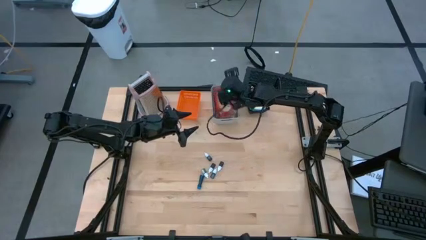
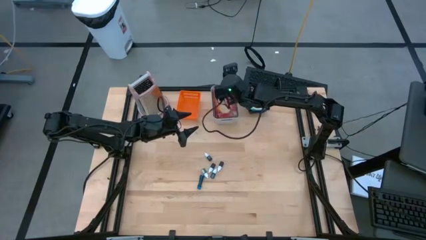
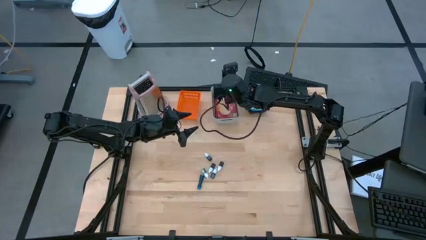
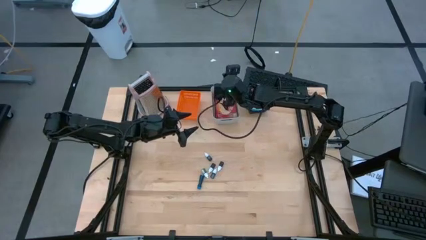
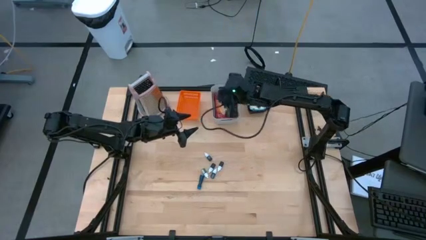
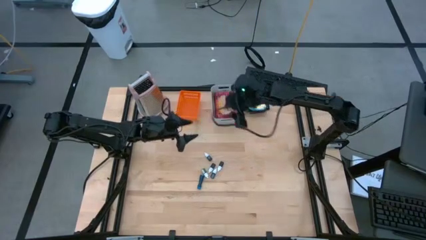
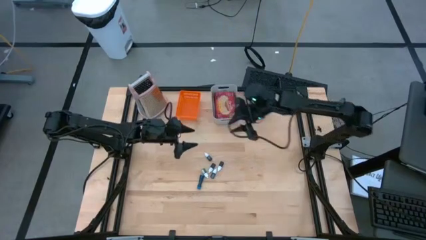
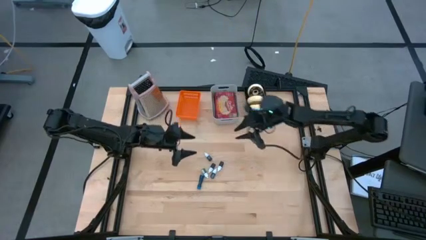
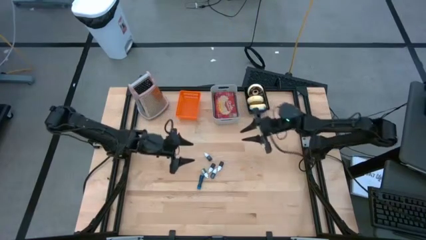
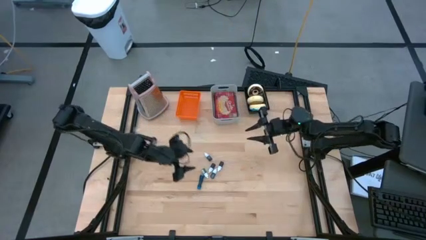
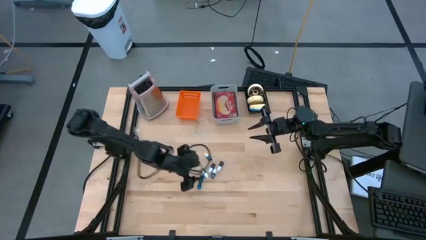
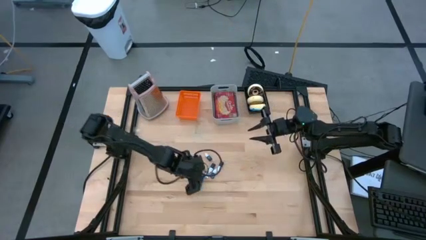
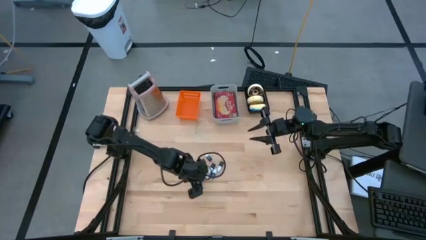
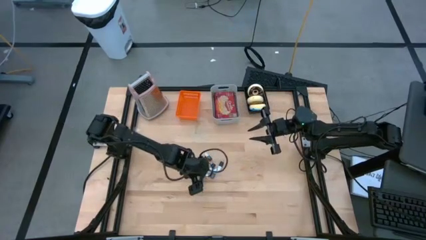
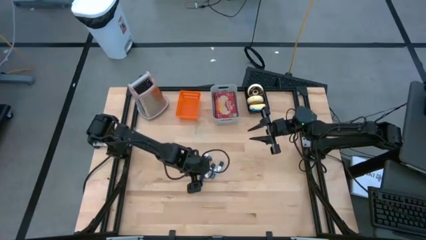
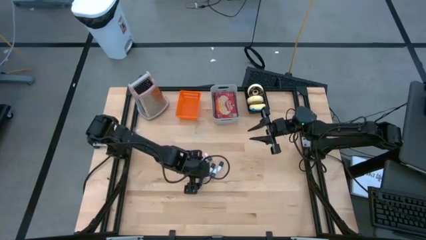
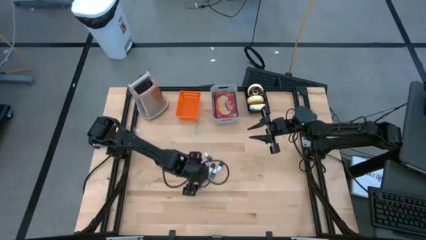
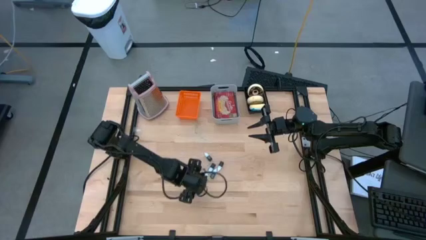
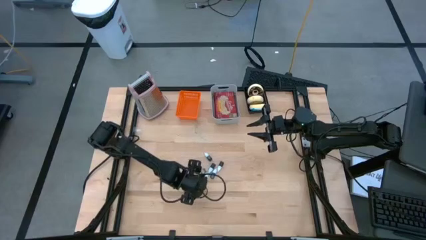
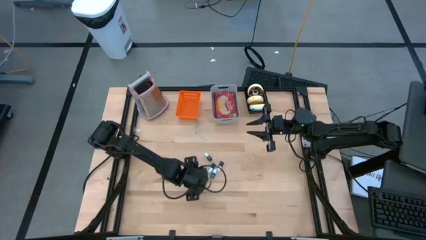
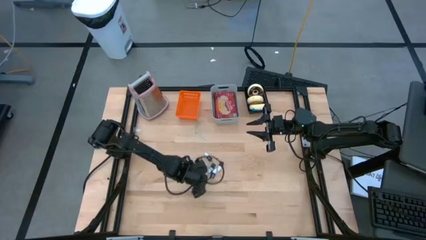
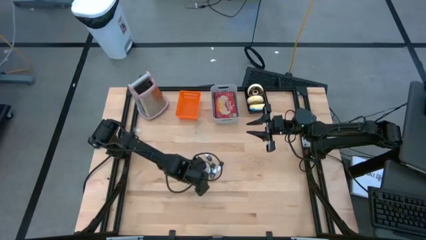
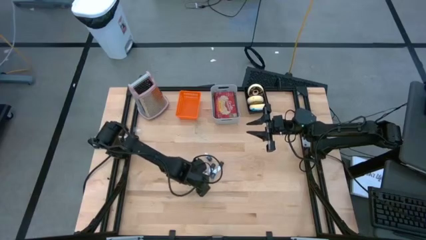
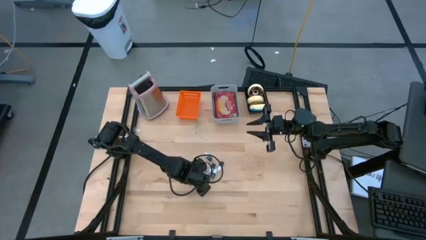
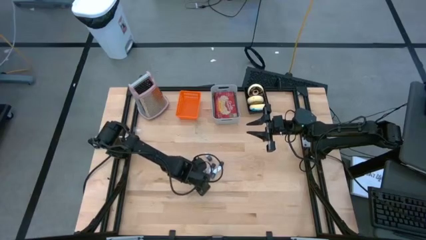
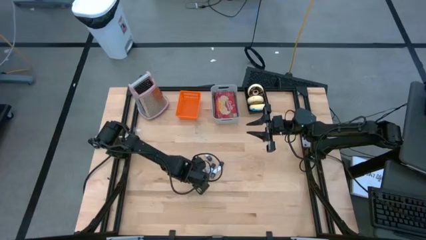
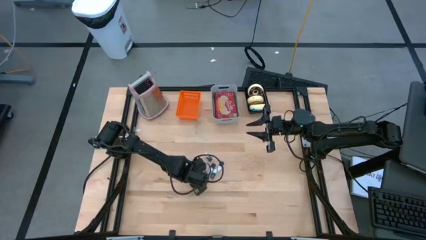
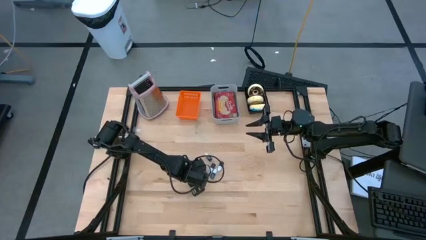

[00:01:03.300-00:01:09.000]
Put the blue food coloring bottle into the orange bin

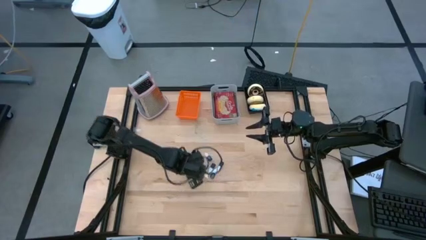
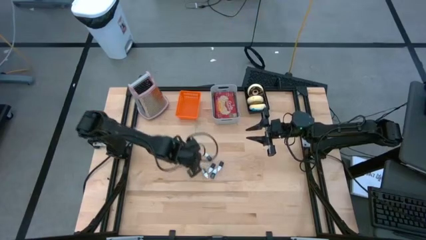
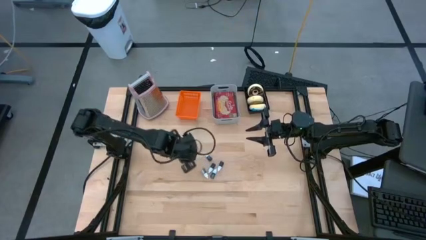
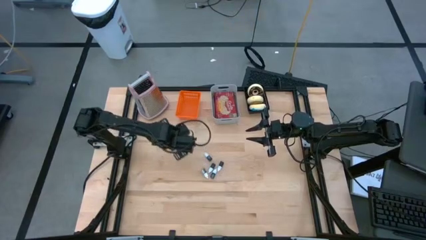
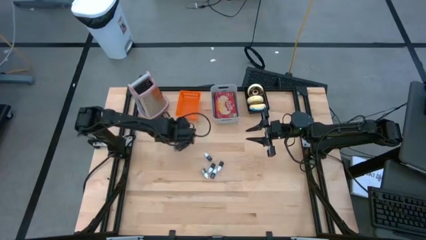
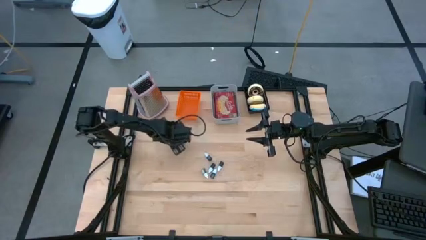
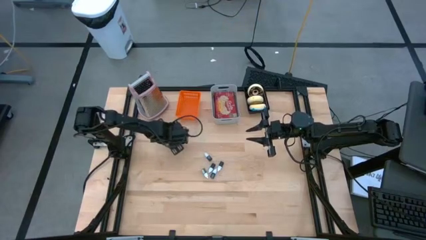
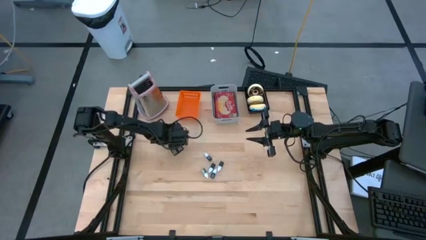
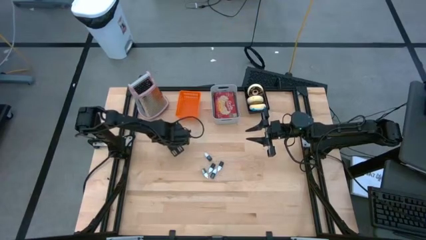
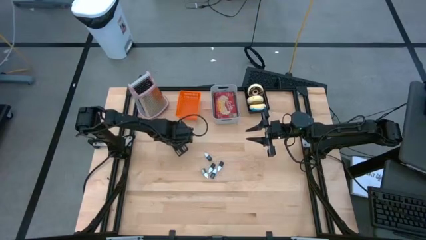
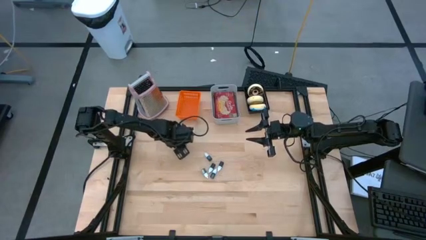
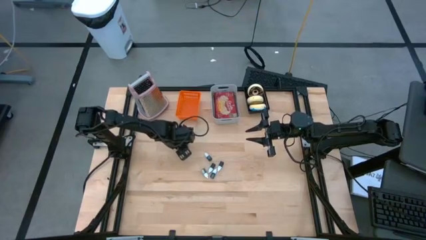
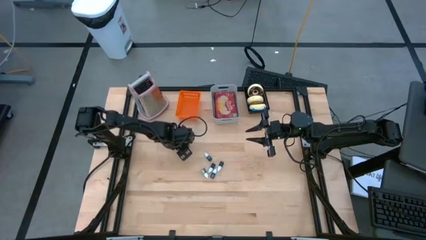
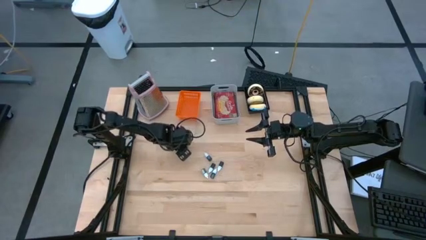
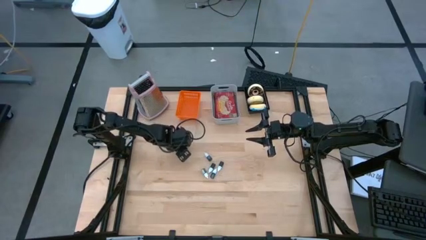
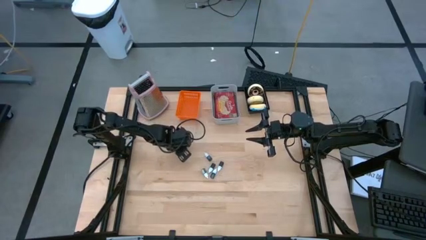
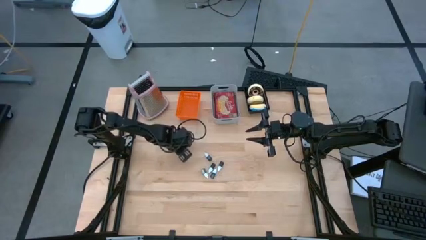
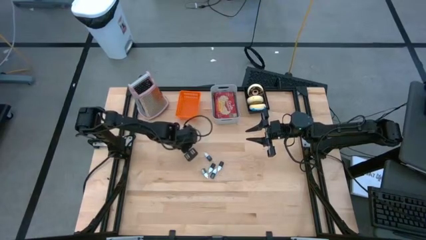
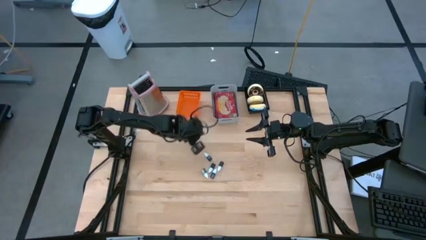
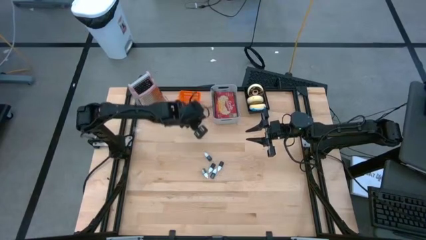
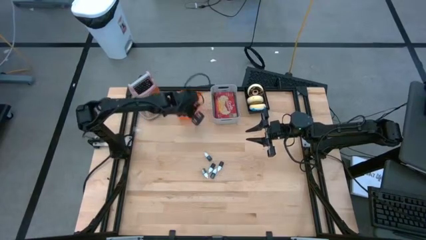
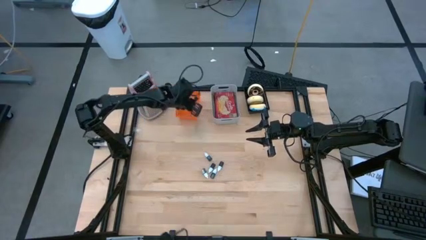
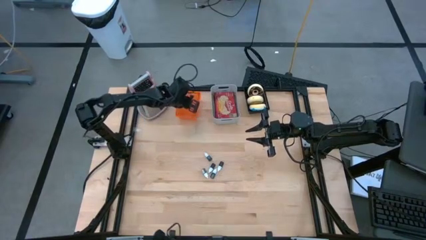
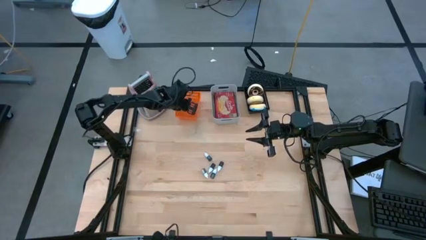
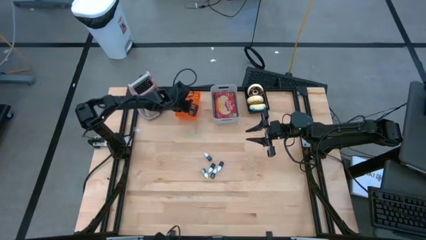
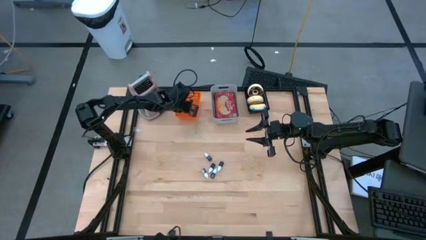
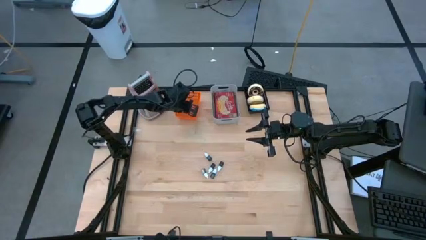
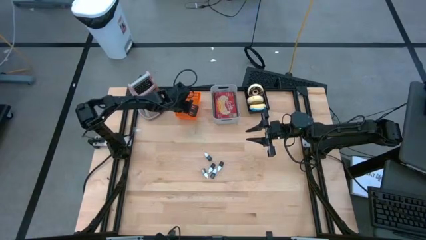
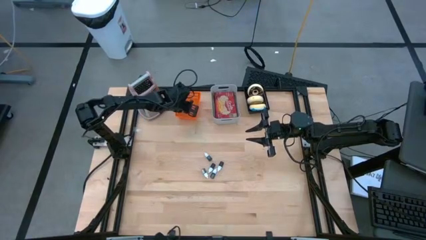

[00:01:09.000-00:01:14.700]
Put the blue food coloring bottle into the orange bin

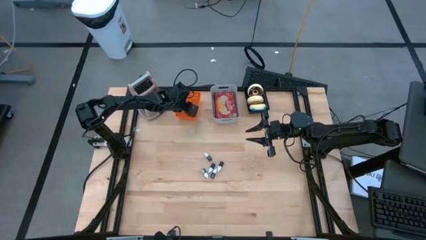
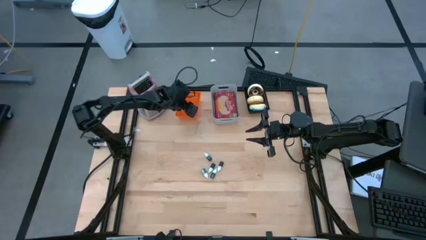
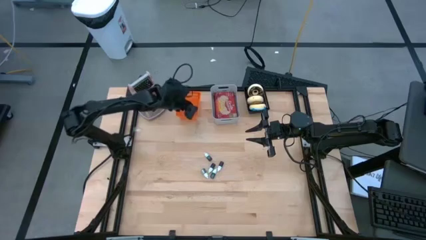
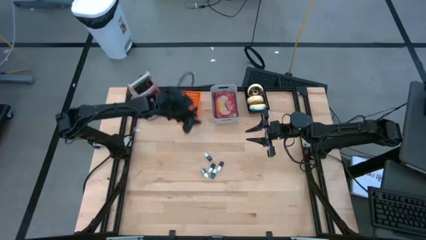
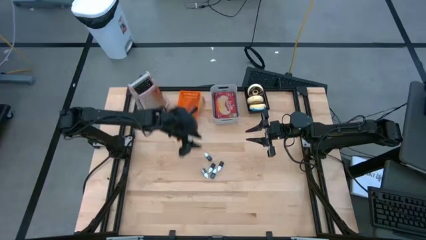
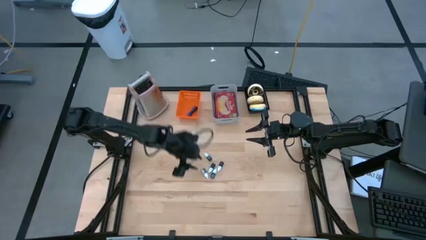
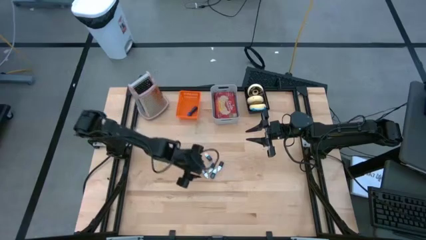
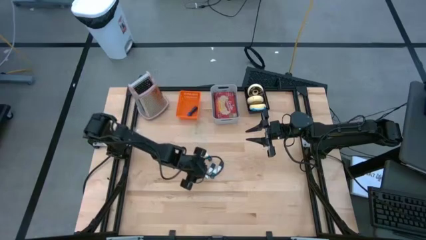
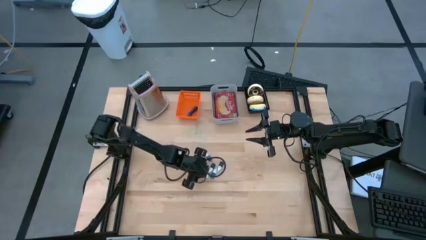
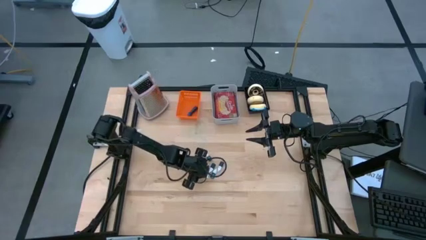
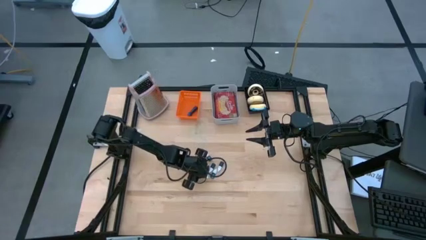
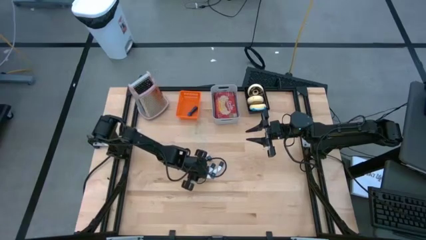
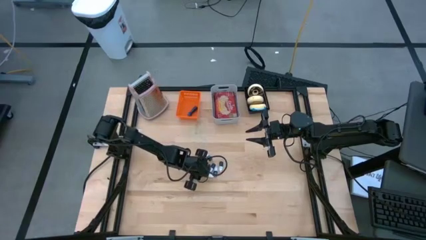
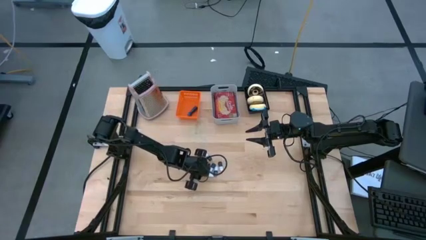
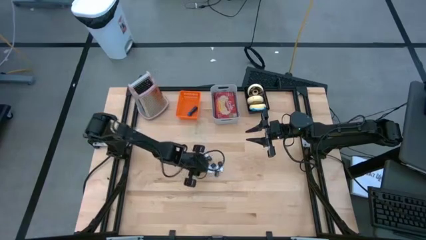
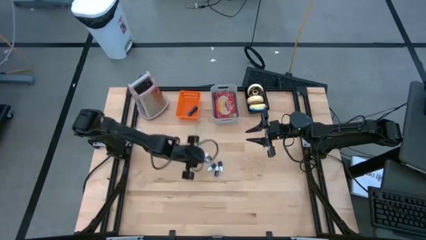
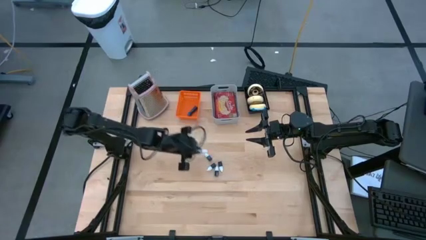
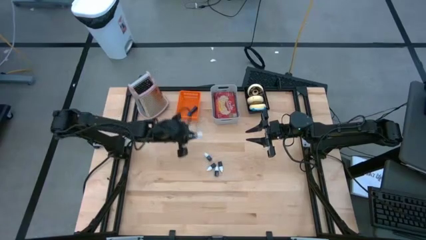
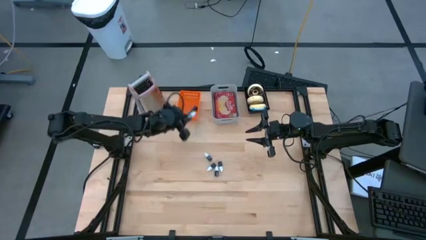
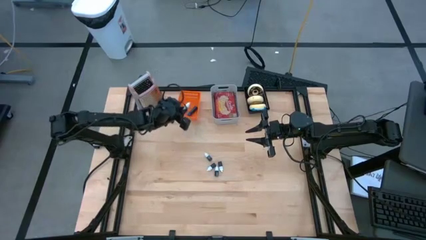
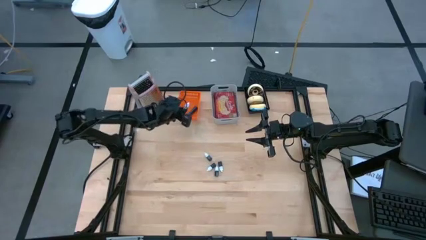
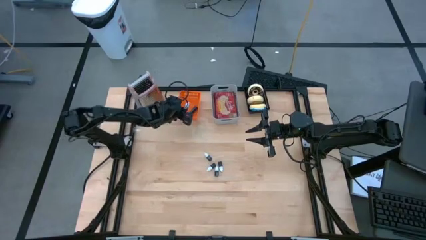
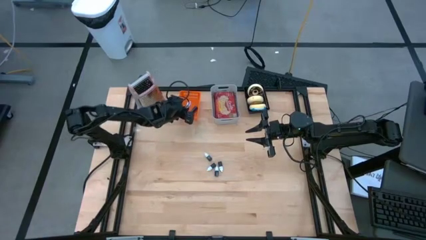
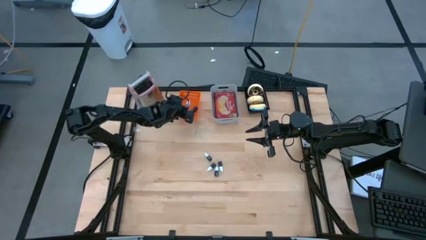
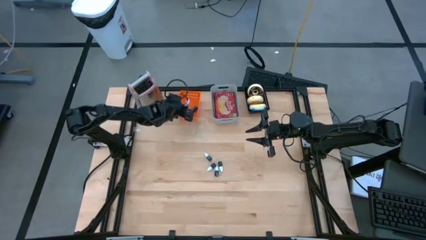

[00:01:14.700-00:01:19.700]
Put the bottom green food coloring bottle into the orange bin
